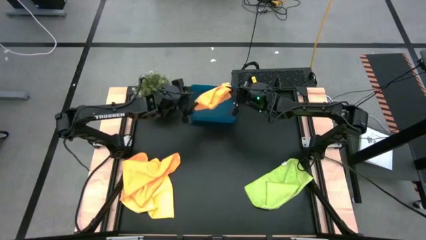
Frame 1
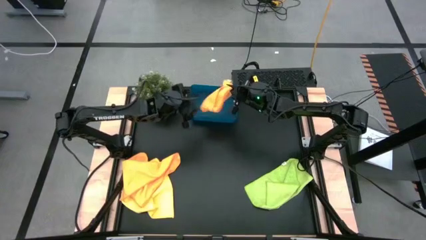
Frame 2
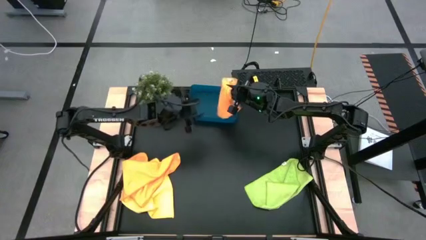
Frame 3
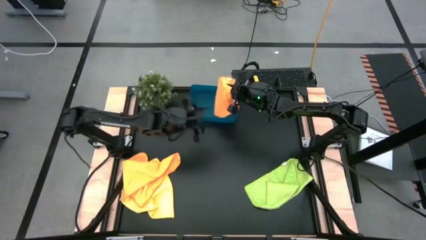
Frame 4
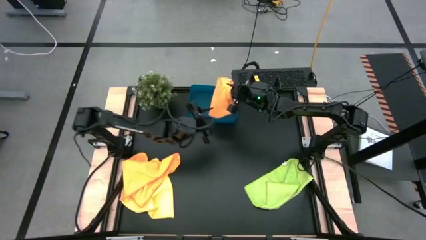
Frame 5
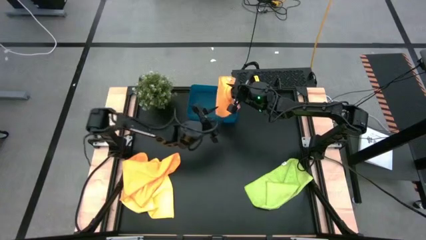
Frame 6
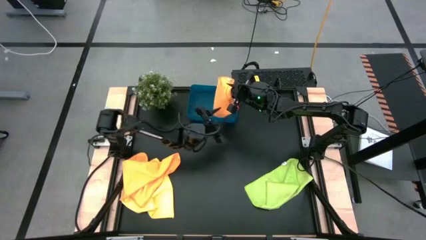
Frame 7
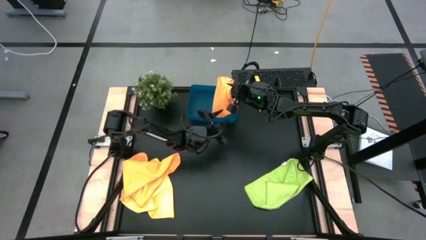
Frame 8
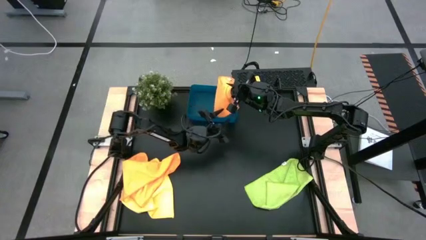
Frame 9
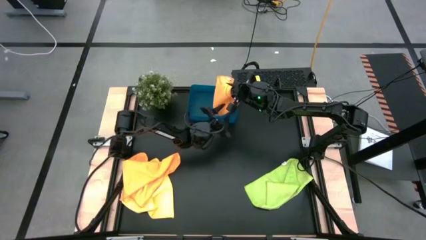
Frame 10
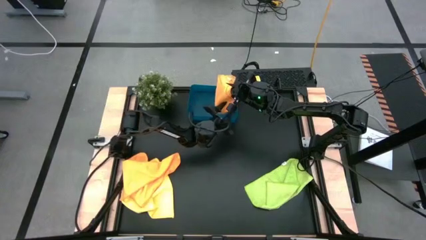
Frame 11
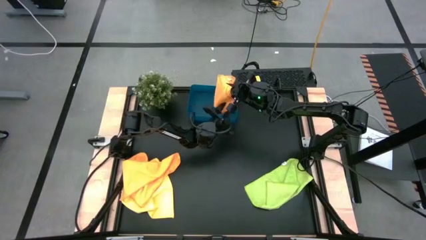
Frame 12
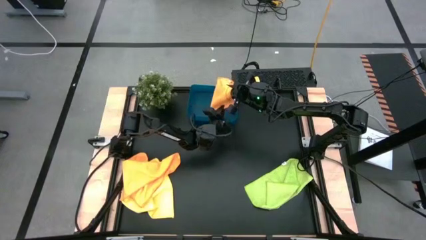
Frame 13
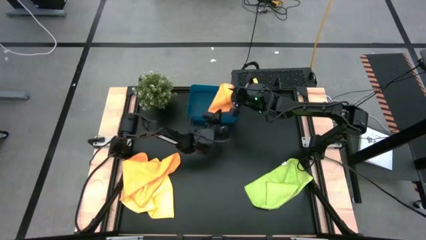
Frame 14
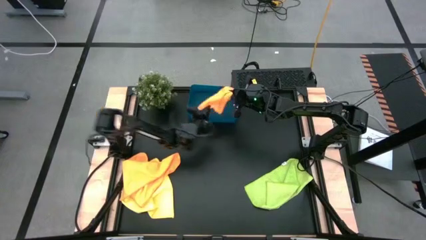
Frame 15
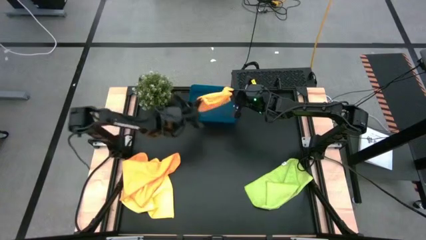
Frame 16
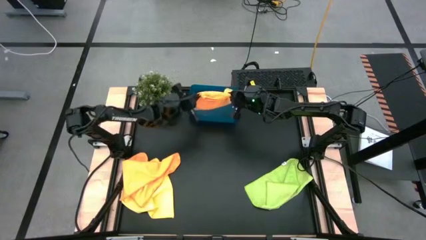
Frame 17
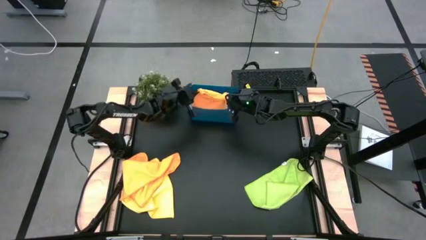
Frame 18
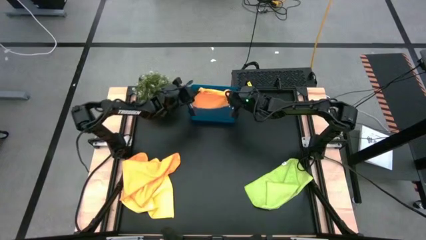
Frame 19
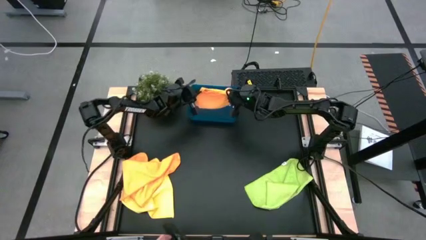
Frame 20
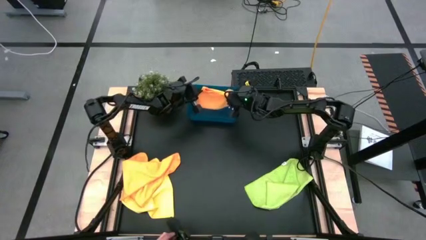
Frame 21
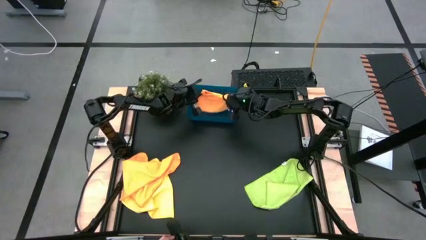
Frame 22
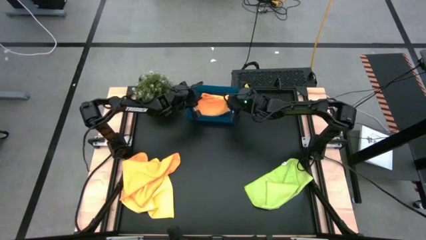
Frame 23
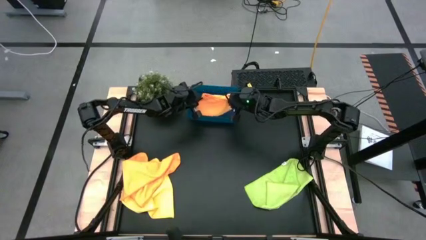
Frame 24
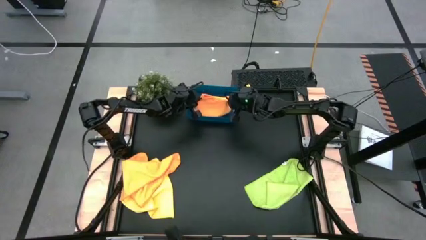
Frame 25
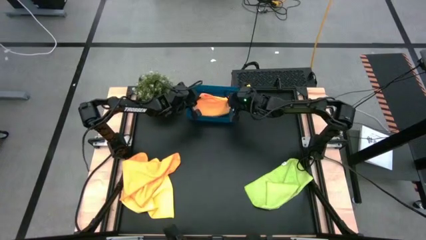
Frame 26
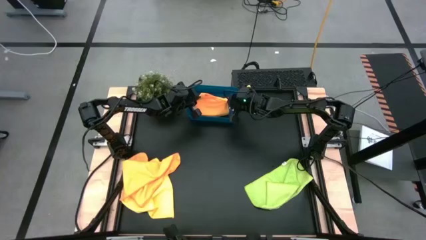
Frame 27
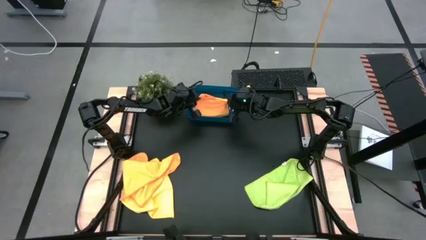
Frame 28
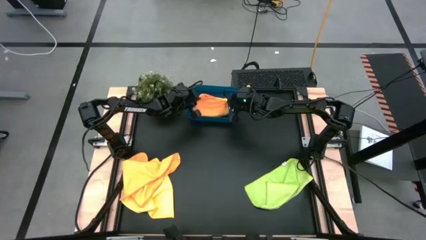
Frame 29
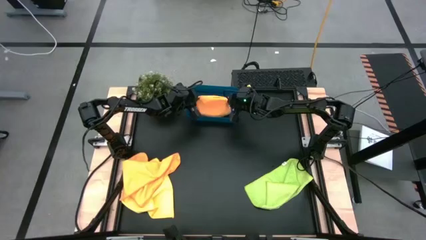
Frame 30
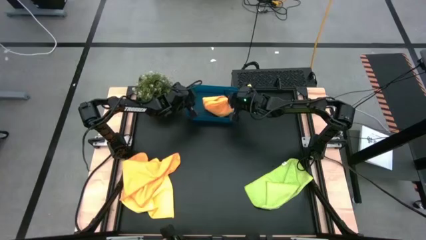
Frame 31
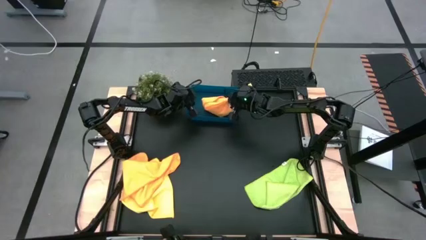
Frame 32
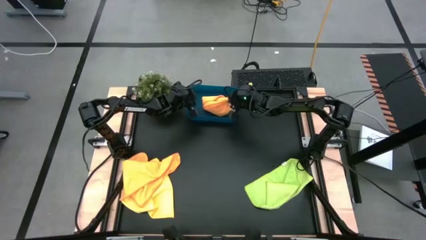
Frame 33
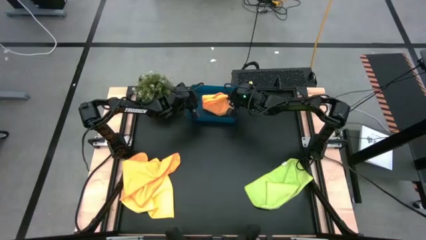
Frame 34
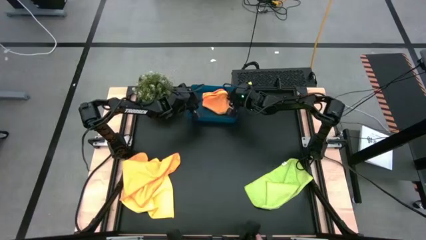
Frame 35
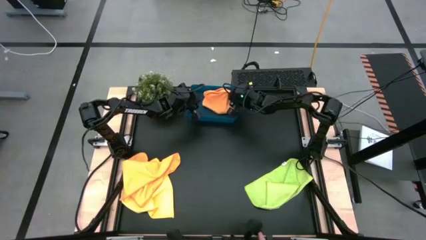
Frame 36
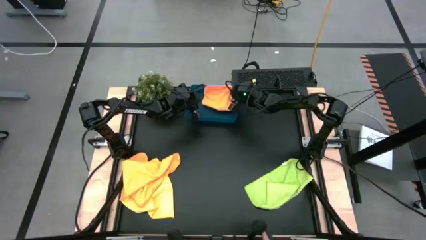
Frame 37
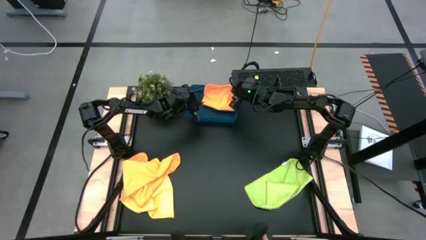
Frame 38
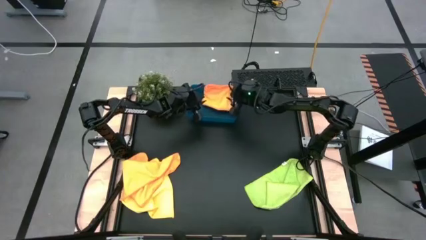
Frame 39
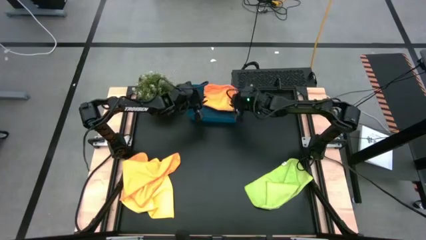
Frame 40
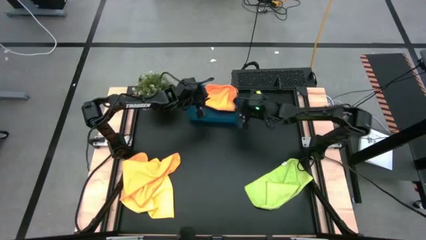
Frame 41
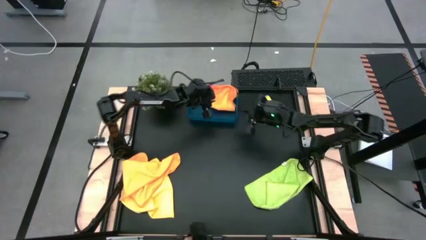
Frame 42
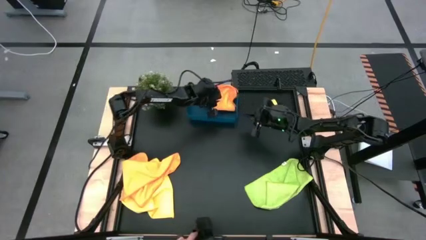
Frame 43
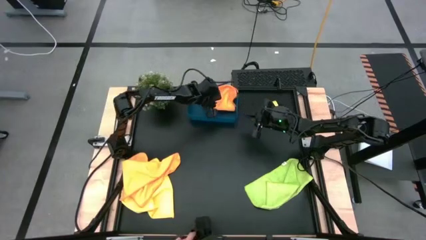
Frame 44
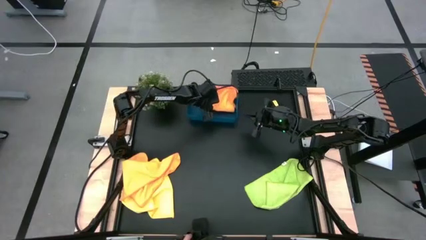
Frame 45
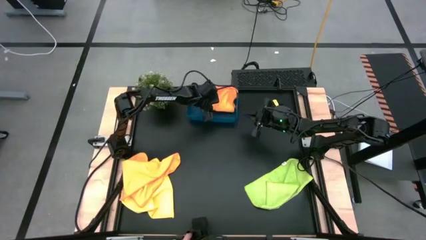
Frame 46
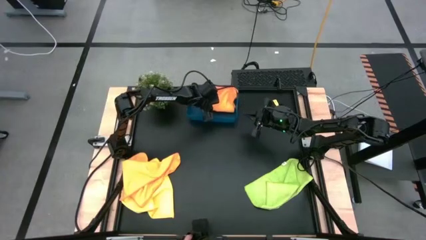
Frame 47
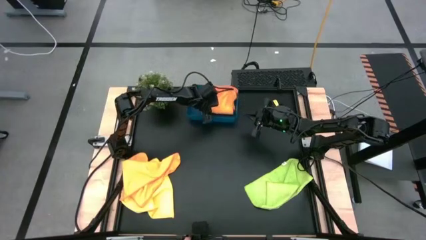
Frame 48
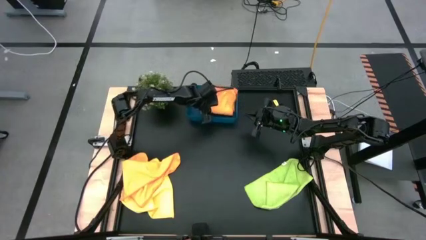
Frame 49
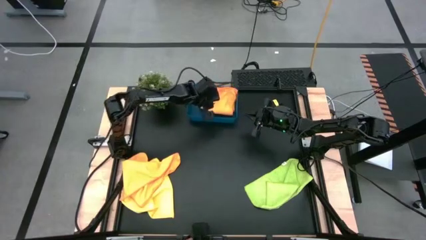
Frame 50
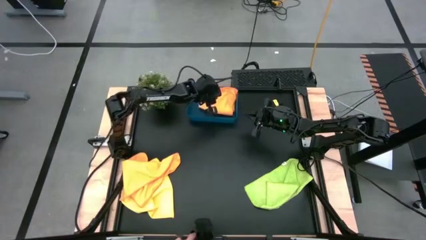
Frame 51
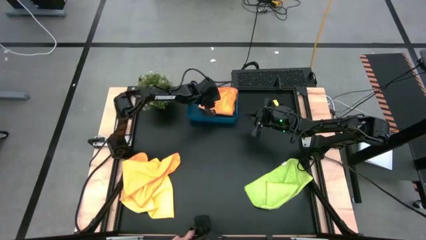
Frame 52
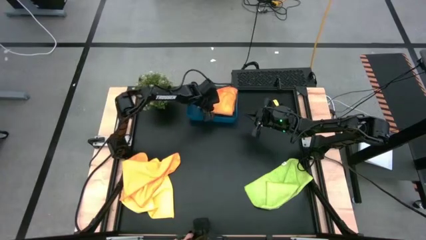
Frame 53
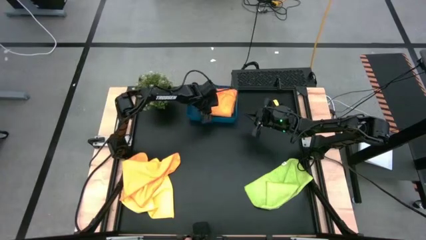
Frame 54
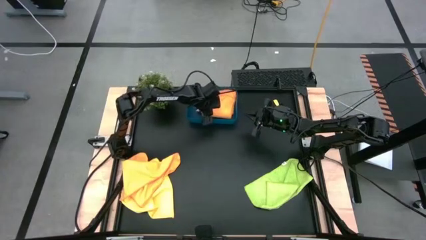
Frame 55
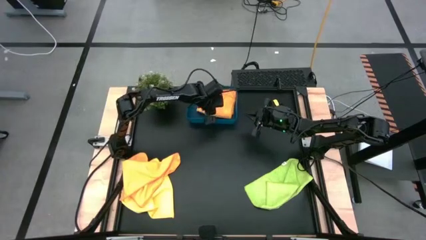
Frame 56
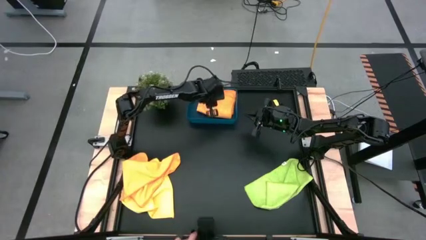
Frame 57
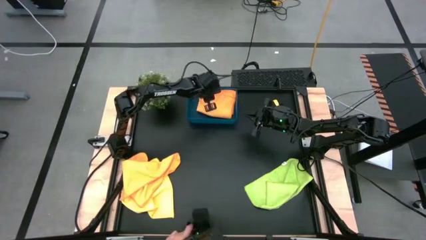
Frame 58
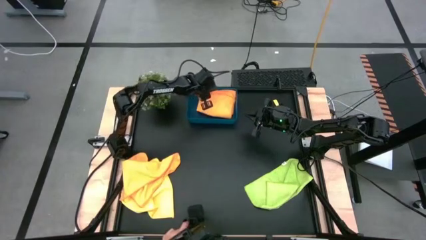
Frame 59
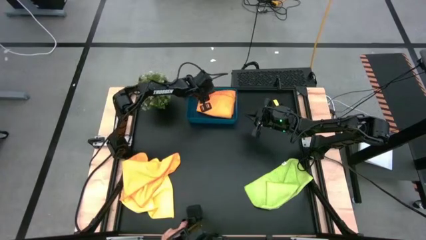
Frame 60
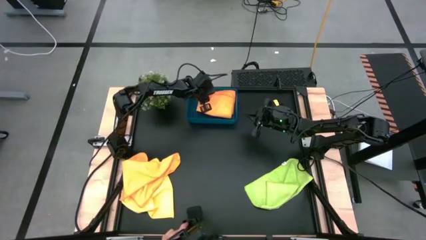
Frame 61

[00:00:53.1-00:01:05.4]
Task: Fold microfiber towels
Put the right orange microfiber towel into the blue bin

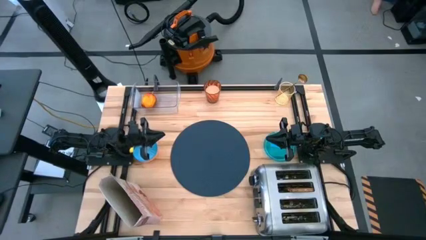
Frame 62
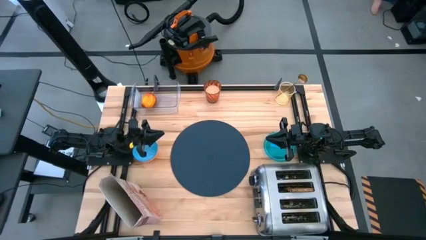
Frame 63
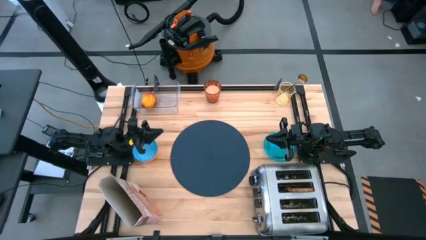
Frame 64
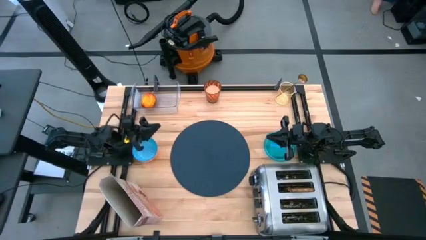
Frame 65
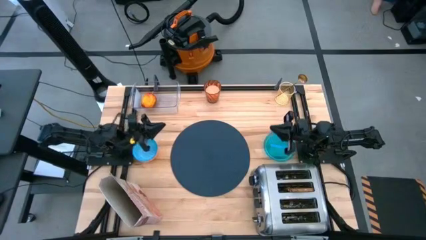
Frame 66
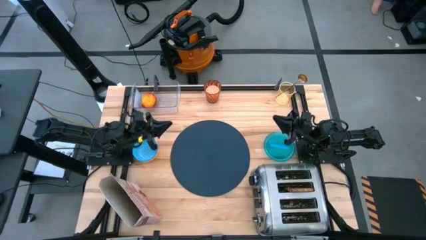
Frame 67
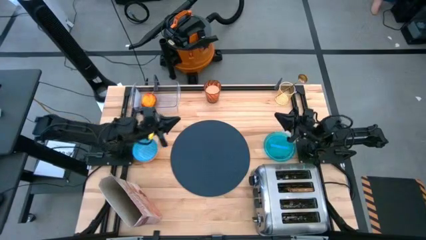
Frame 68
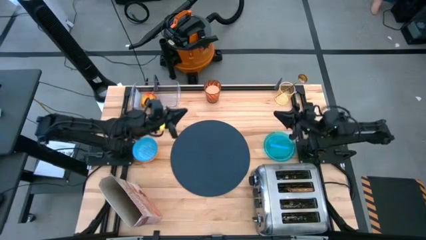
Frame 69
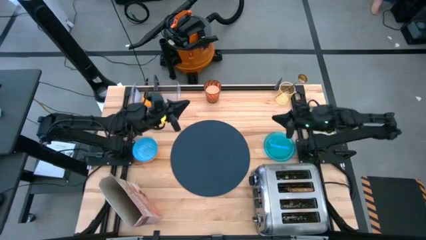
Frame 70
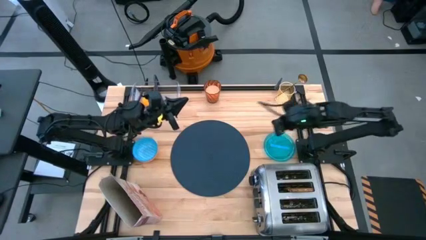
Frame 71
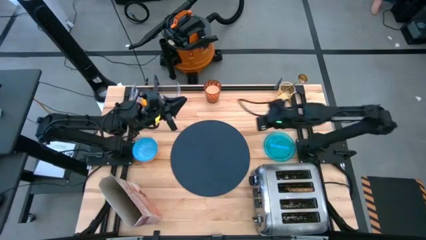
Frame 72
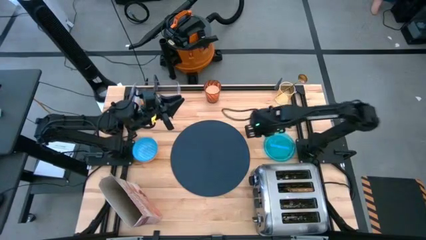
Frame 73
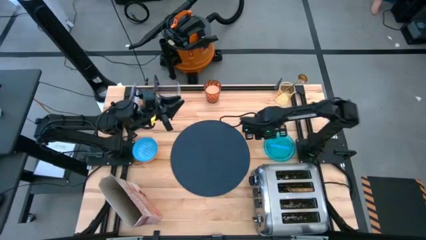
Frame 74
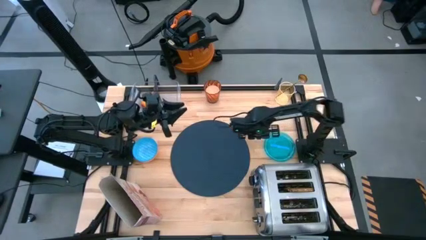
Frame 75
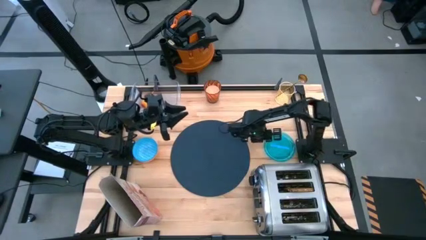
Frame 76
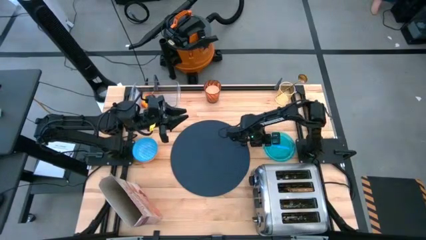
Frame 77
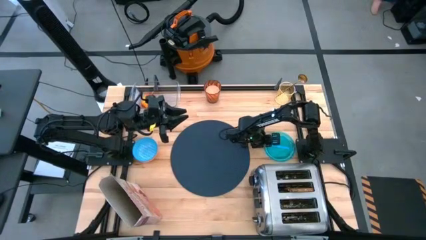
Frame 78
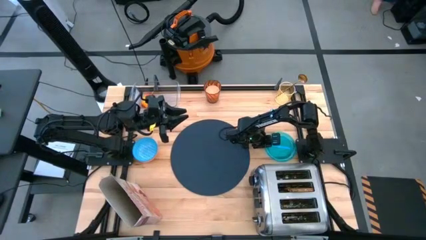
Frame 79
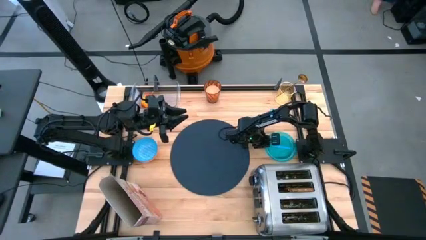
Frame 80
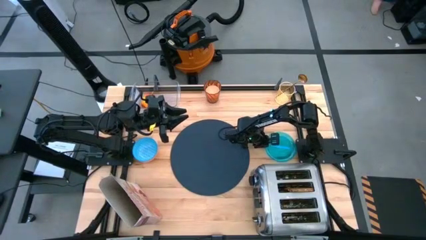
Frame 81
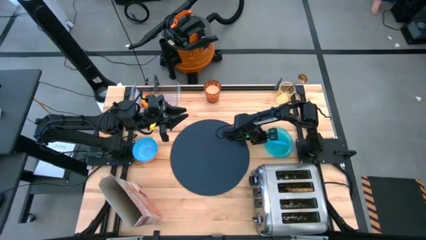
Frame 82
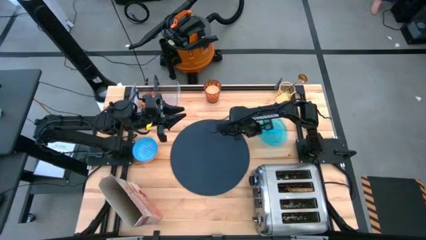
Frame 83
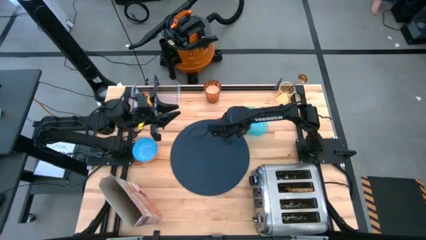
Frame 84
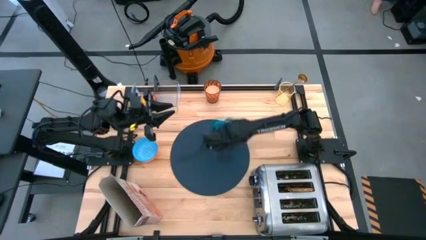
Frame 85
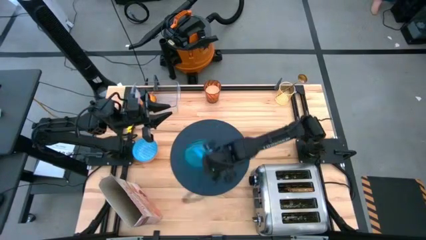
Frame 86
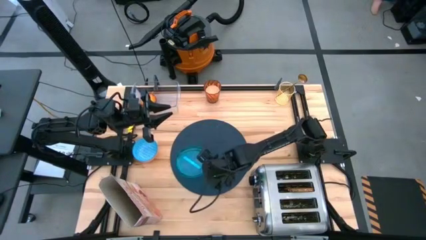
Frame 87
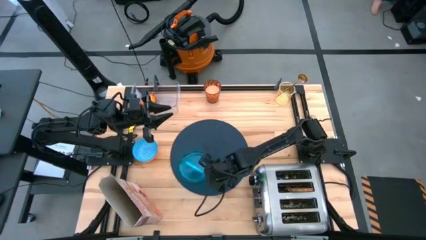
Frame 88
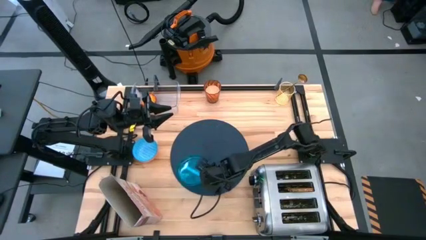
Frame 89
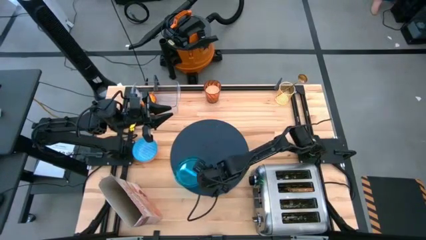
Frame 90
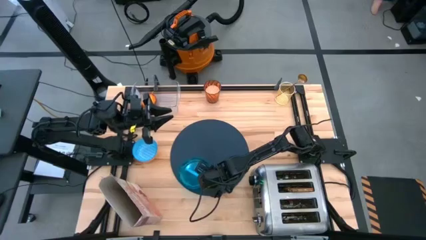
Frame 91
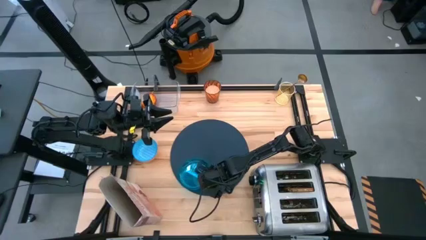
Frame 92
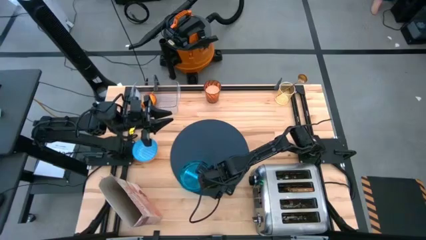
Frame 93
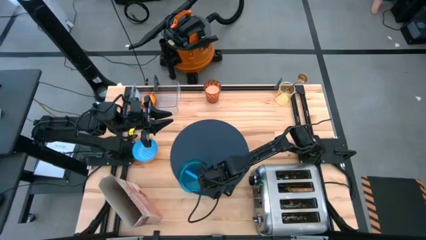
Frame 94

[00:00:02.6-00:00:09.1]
Task: Arrange a breakfast setting
Put the plate into the bottom left of the placemat
